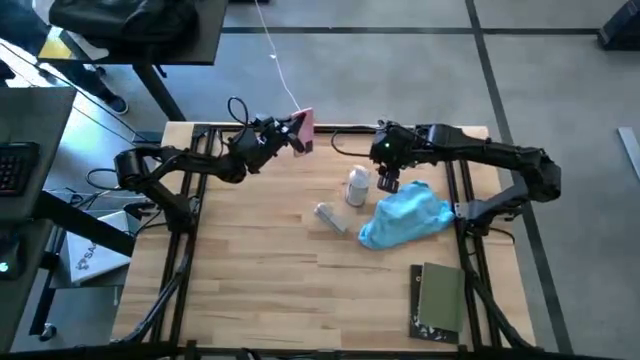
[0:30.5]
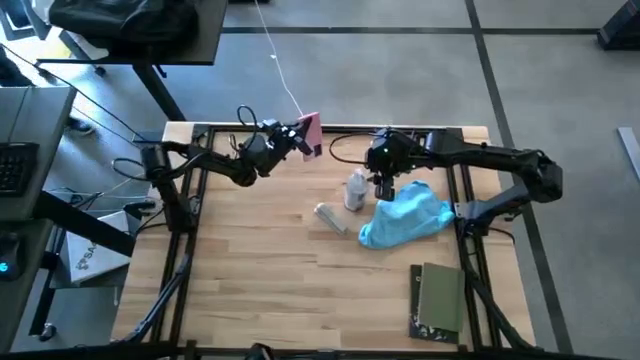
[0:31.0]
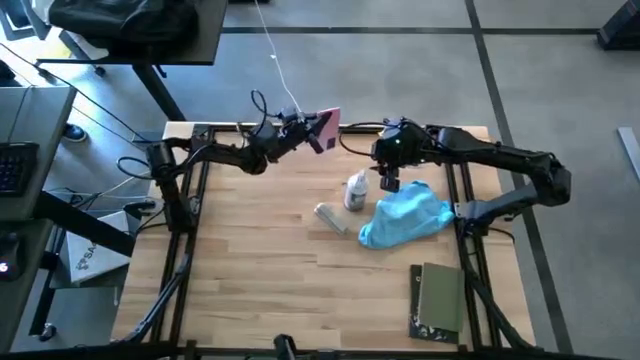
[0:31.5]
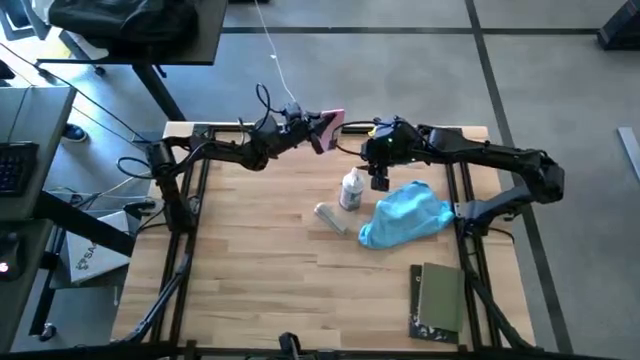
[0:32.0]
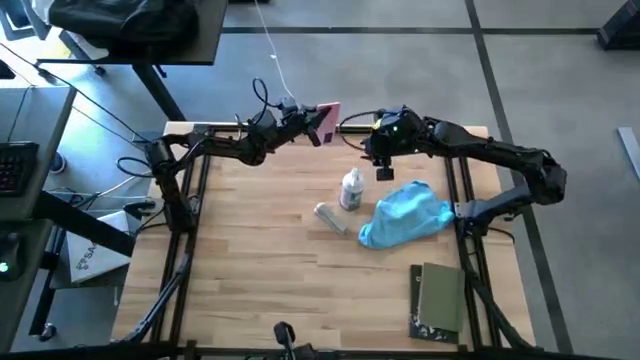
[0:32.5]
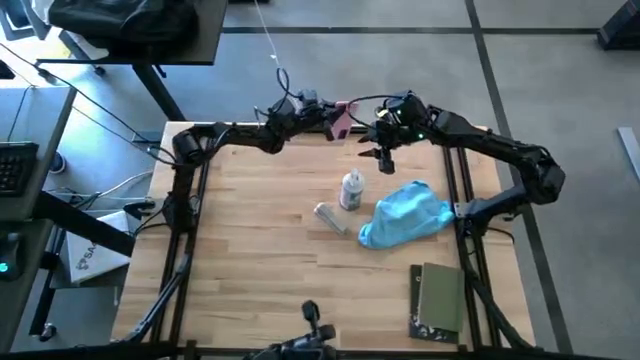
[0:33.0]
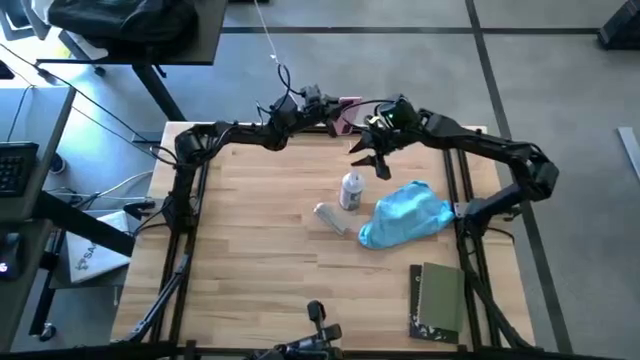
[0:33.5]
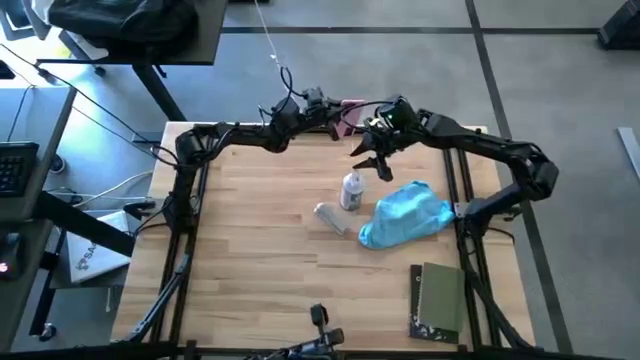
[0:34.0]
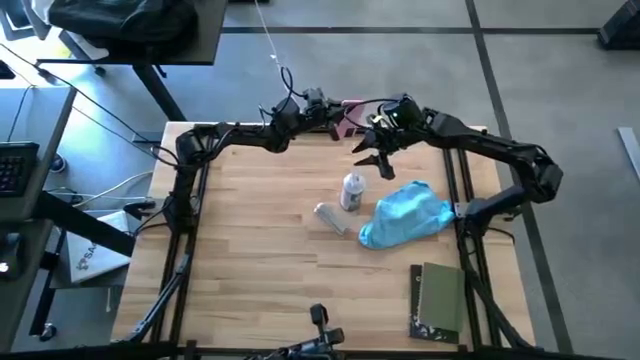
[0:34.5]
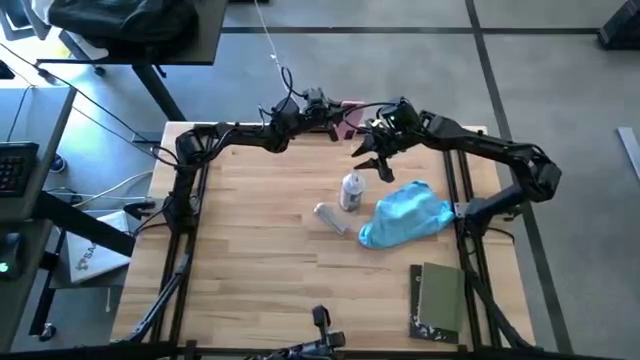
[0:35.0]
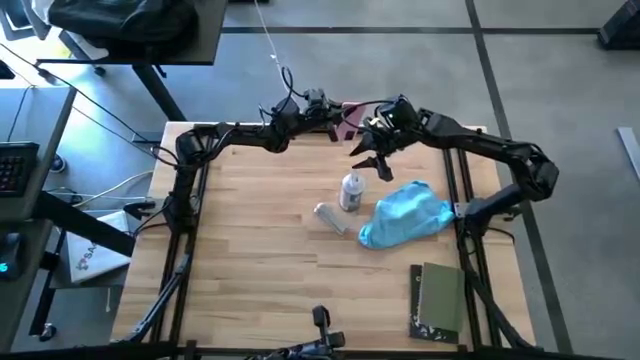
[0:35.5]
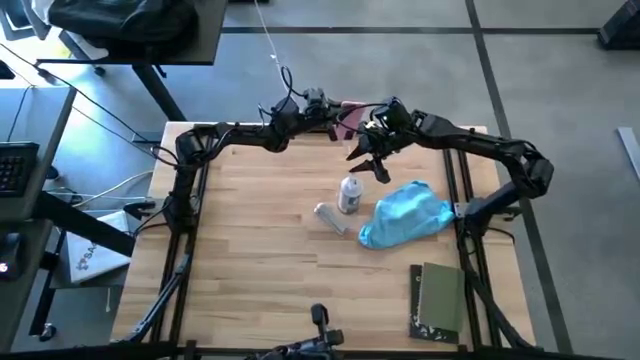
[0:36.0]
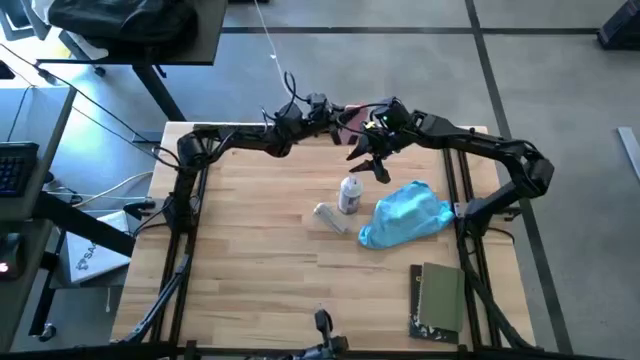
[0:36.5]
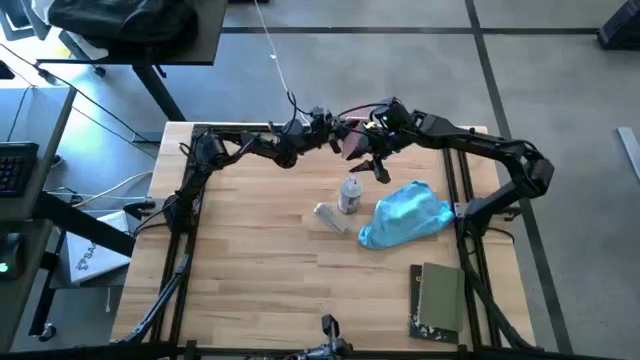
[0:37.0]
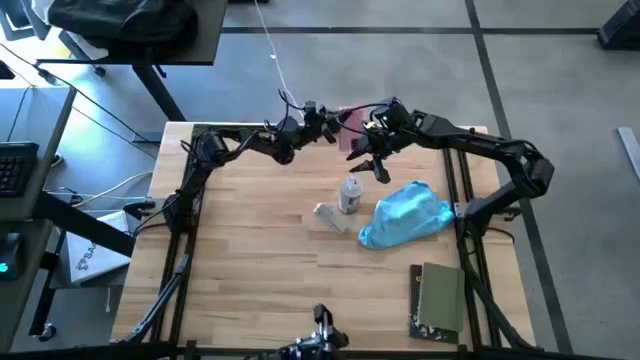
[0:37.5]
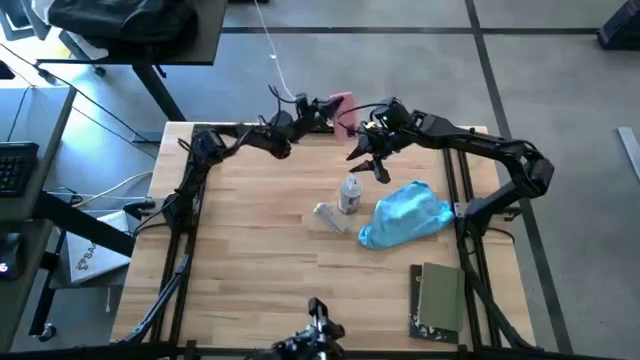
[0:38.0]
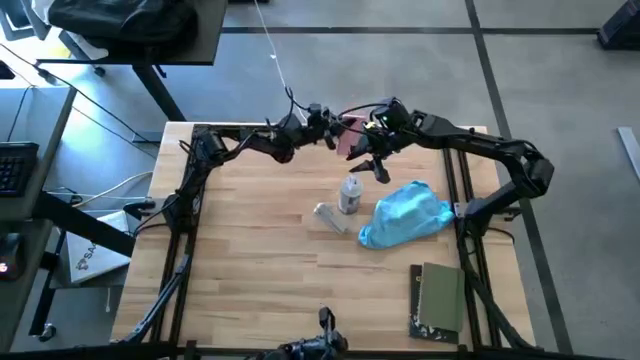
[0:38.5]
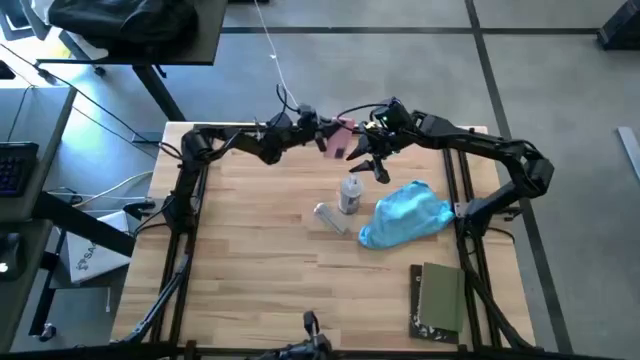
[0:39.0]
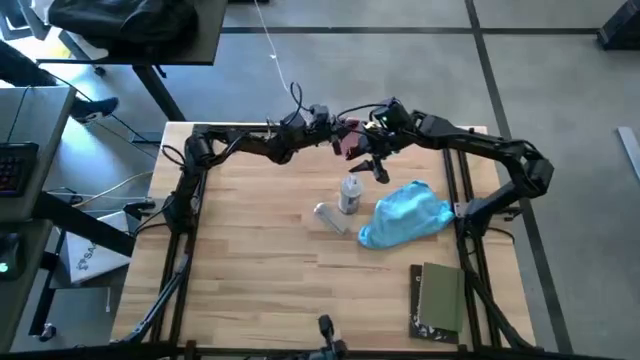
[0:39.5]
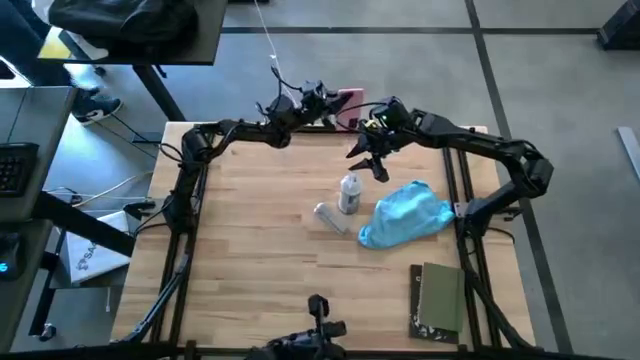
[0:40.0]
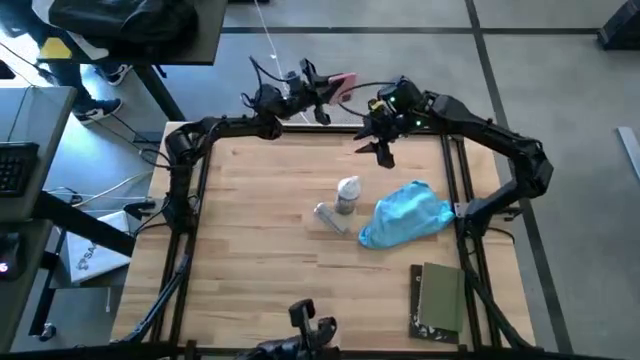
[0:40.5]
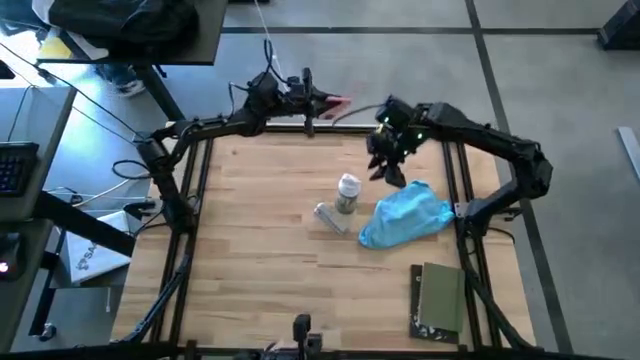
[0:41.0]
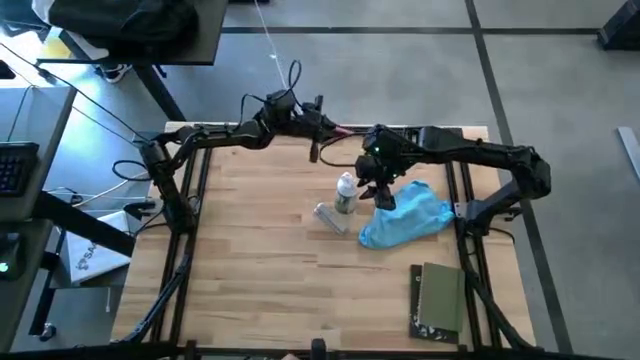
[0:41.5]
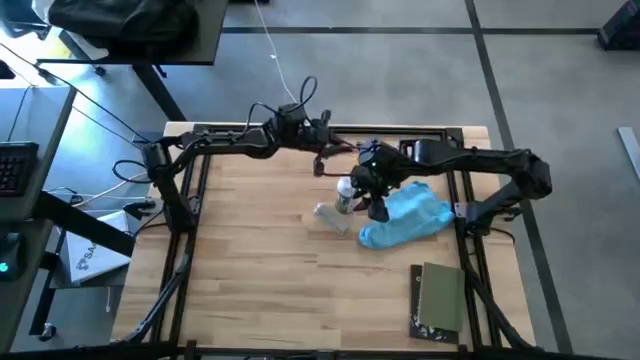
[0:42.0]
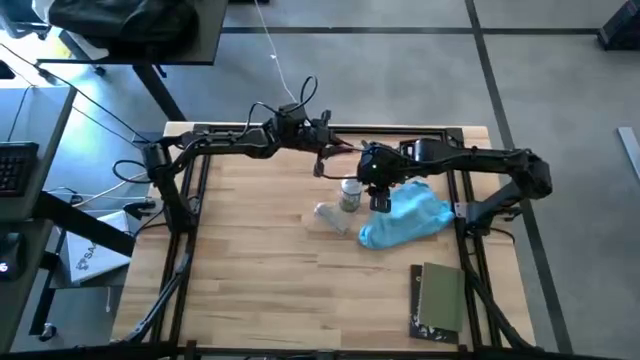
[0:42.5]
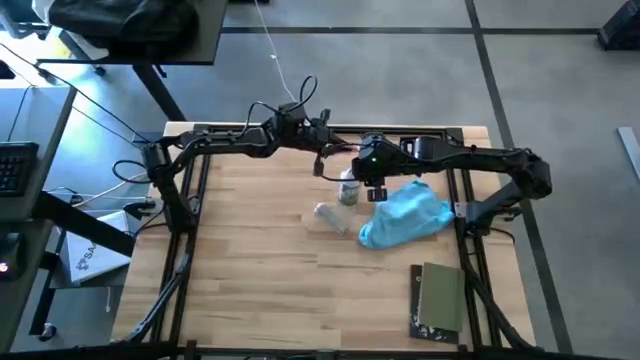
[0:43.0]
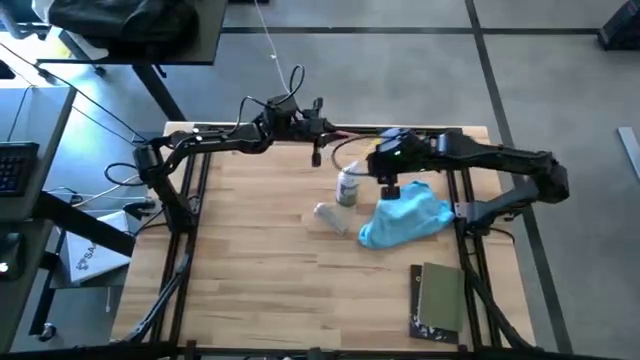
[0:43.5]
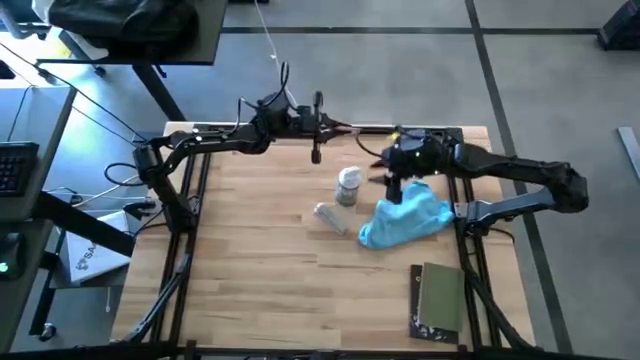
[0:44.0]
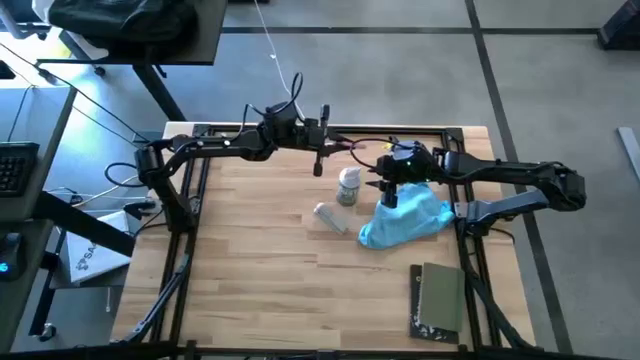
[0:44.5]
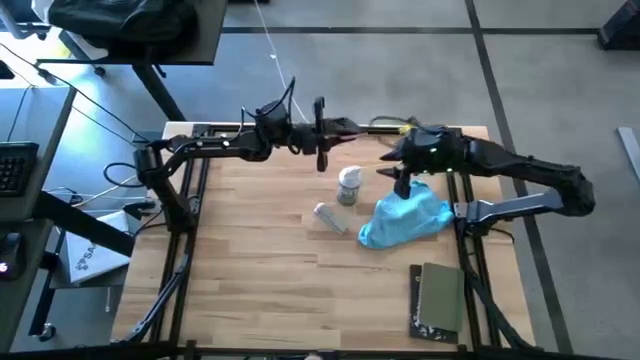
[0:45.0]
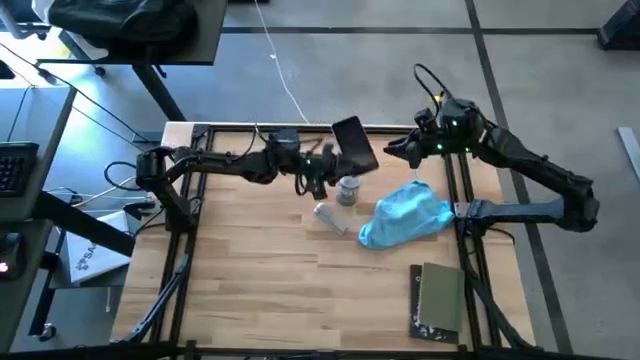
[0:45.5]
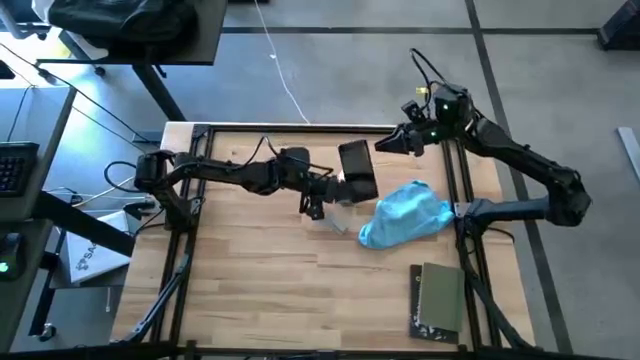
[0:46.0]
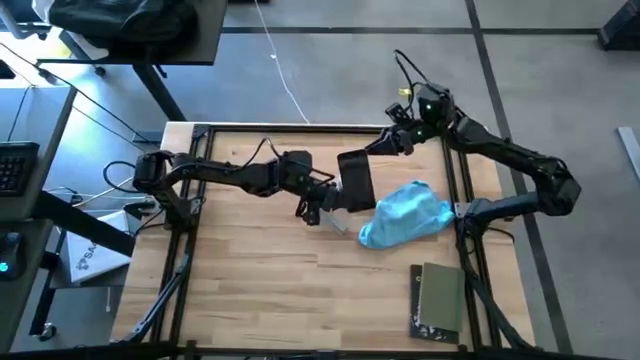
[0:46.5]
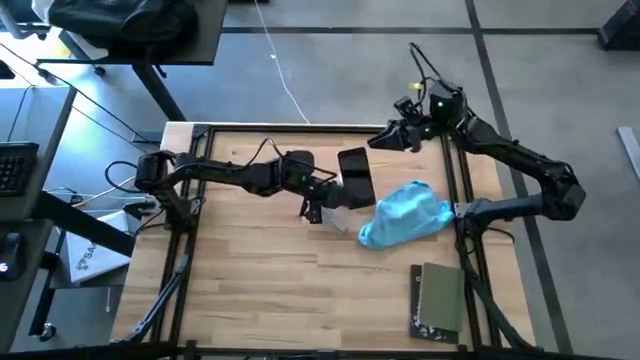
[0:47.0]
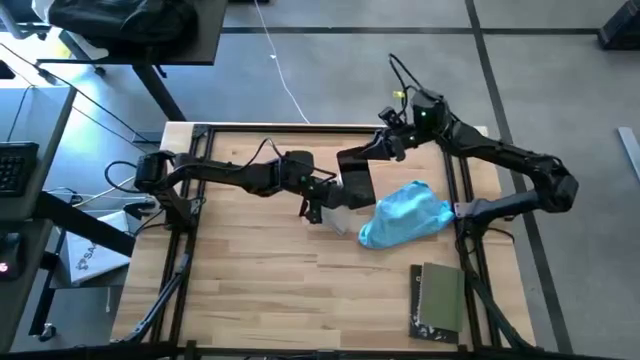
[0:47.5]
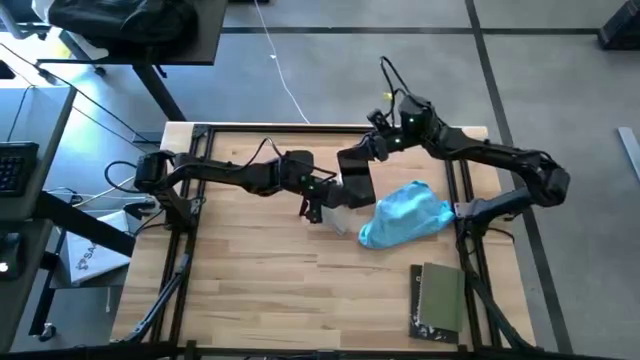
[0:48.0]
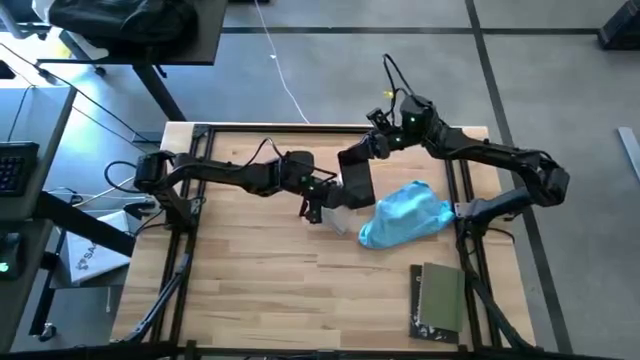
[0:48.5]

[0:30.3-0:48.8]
Task: Apply microfiber cloth
Spray the pink phone with the spray bottle

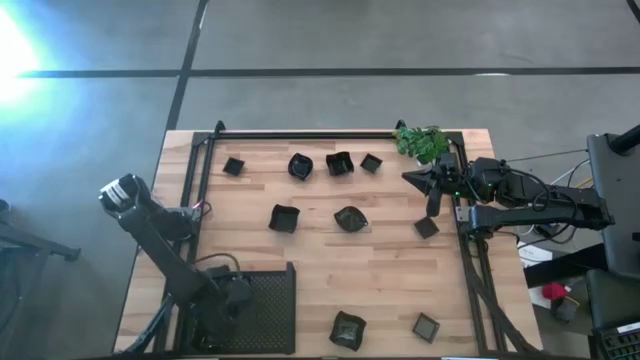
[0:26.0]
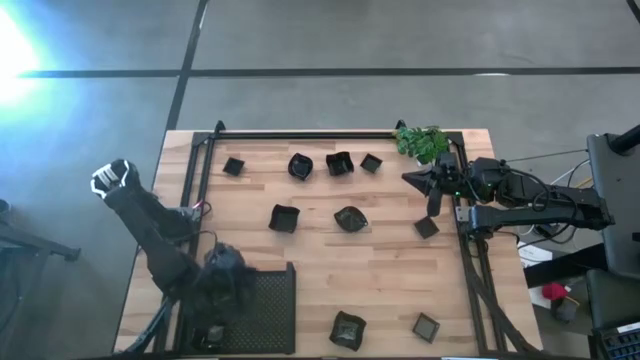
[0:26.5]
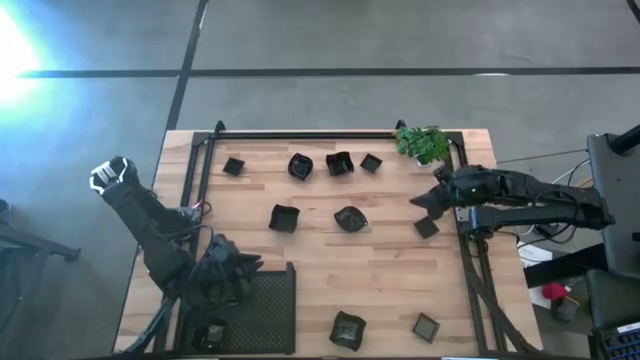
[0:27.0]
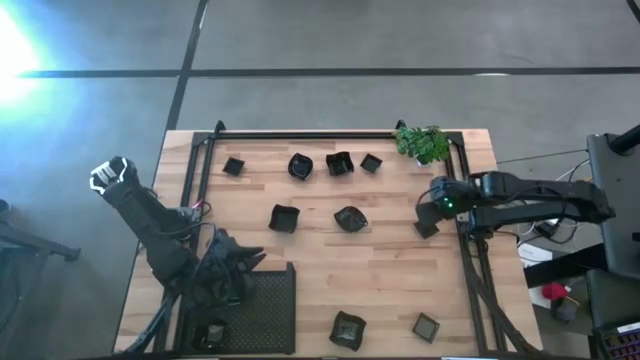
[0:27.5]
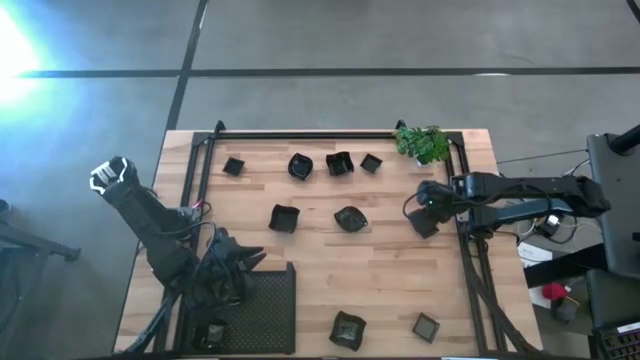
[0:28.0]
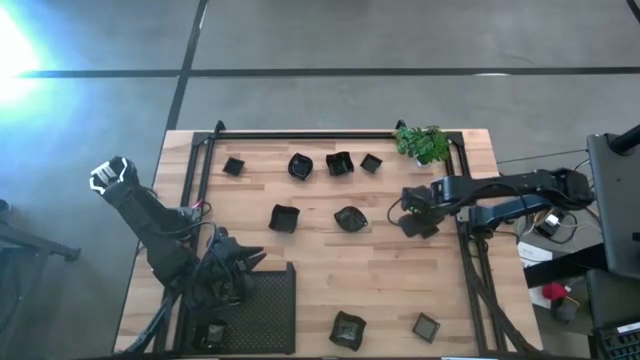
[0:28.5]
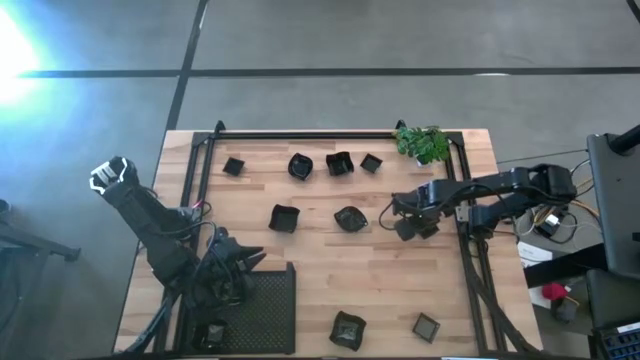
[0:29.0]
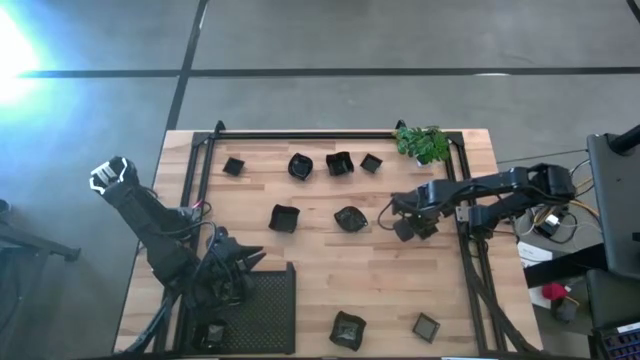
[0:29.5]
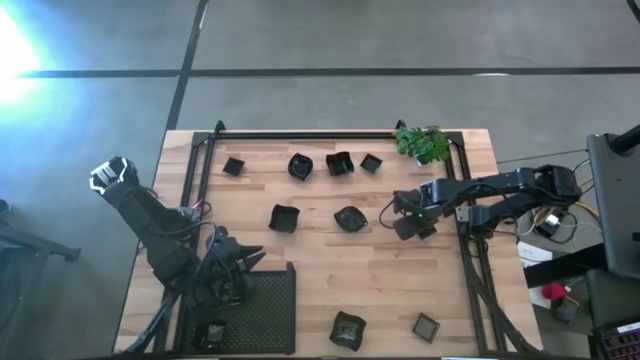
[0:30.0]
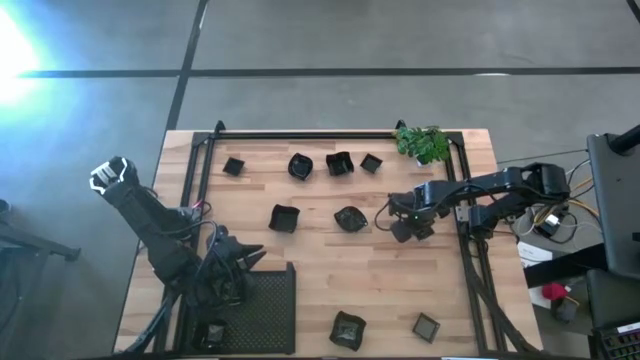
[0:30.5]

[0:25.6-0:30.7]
Task: Pick & Place Mini shaped plates
Put the black square plate on the shelf
